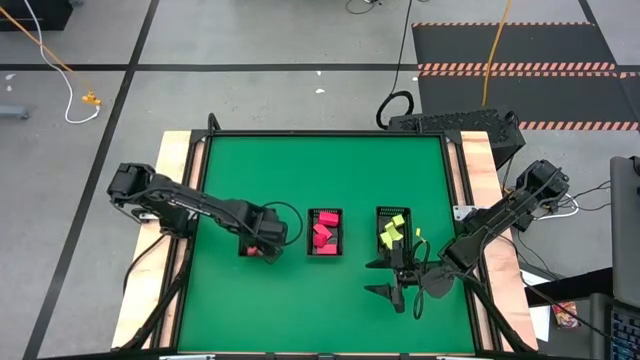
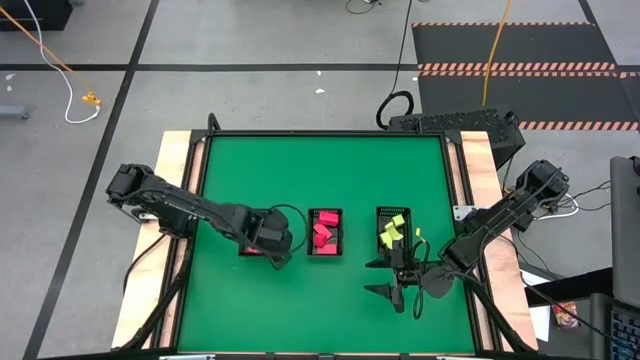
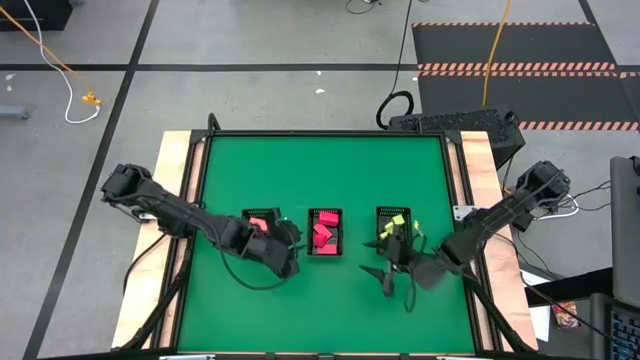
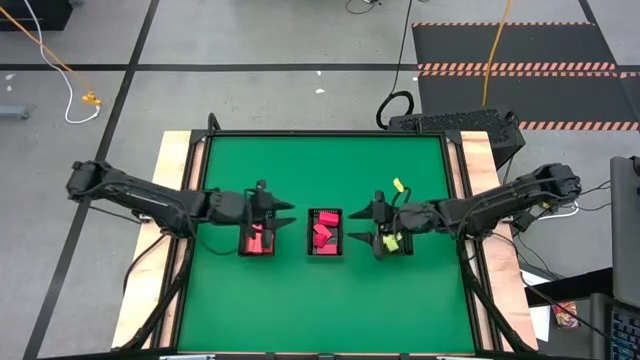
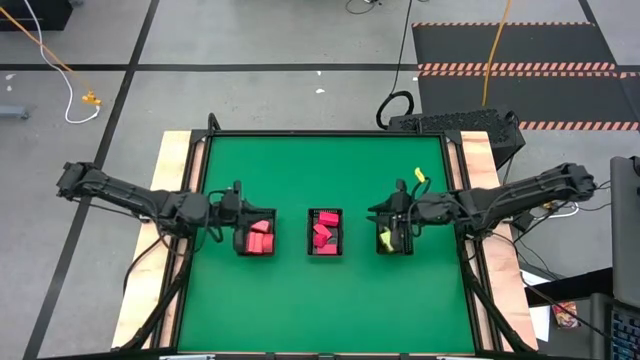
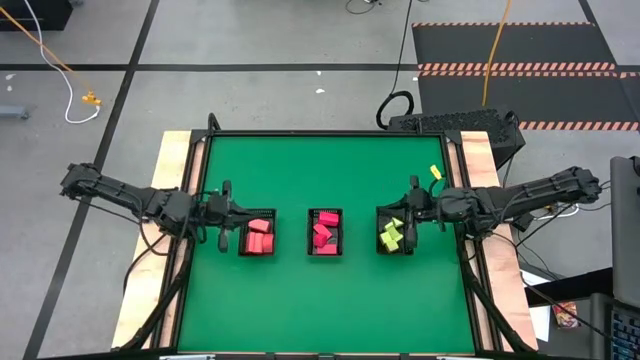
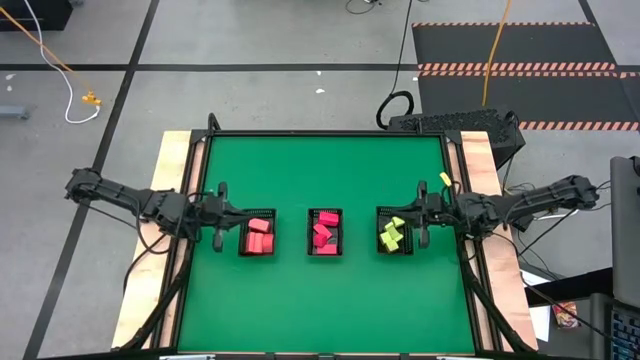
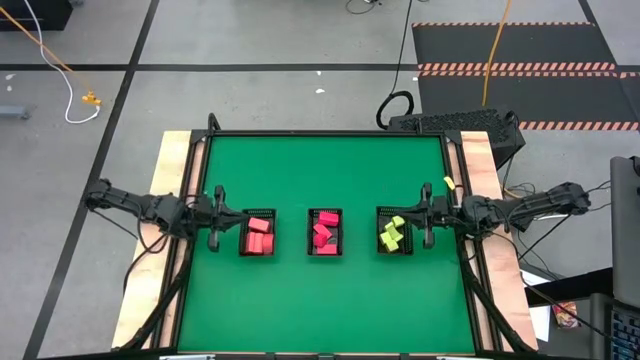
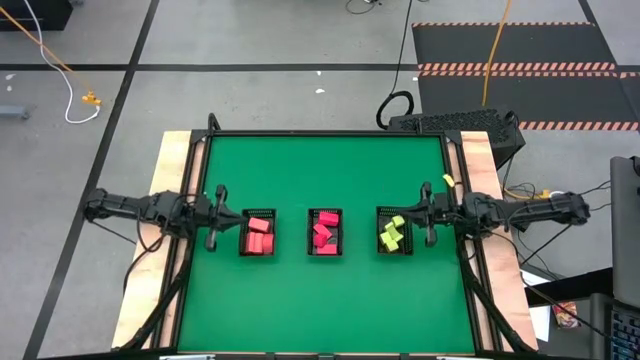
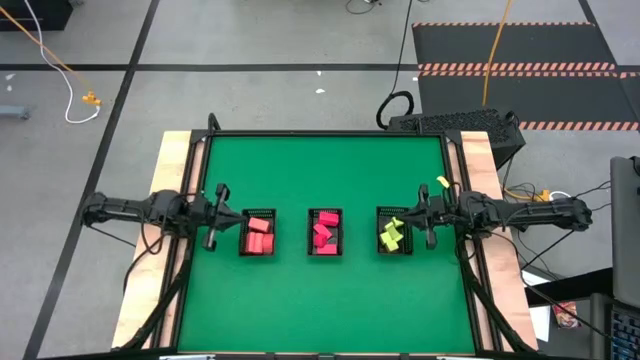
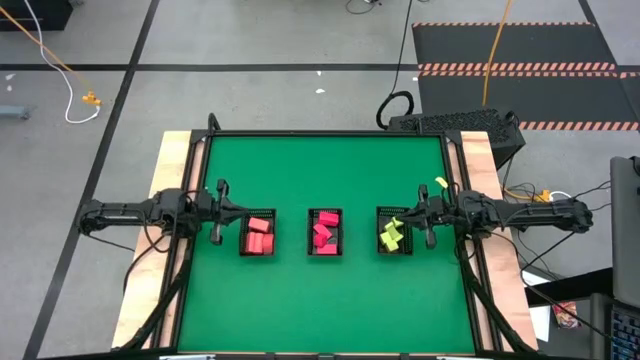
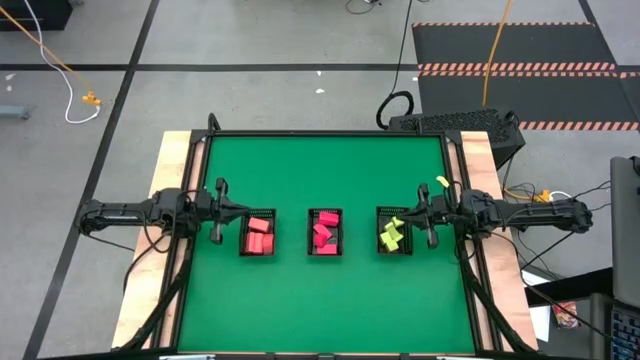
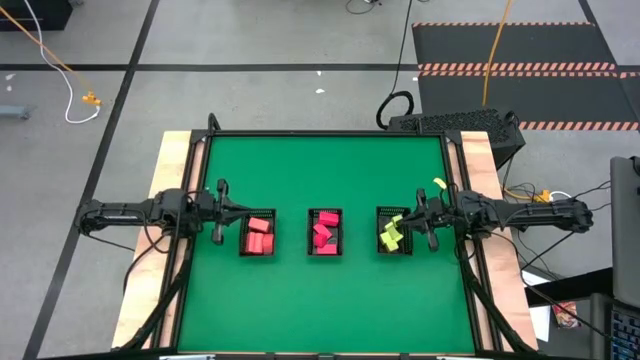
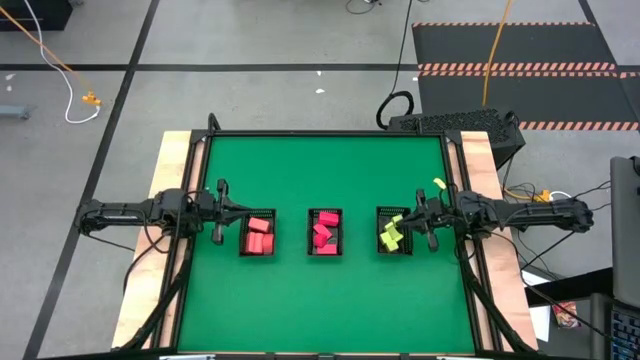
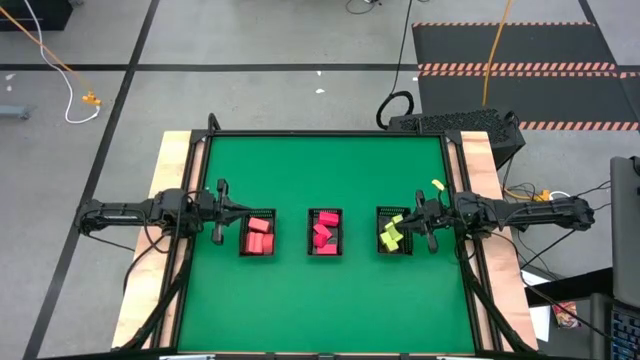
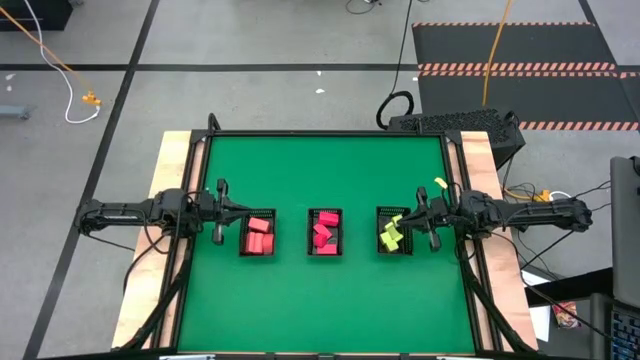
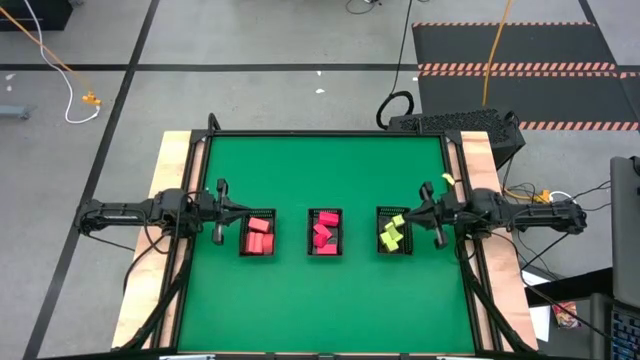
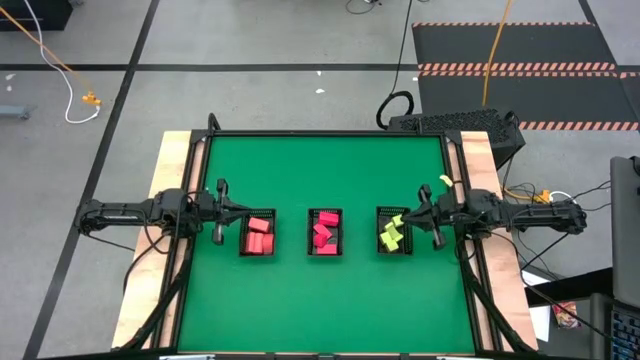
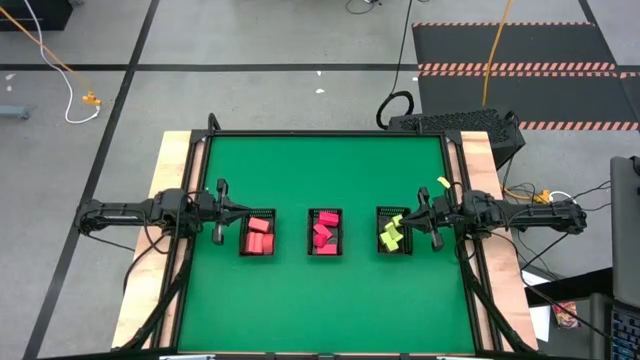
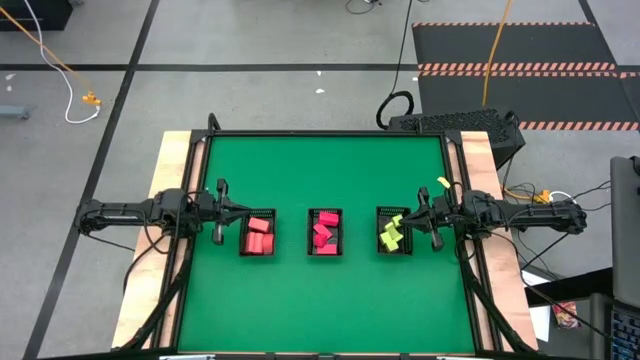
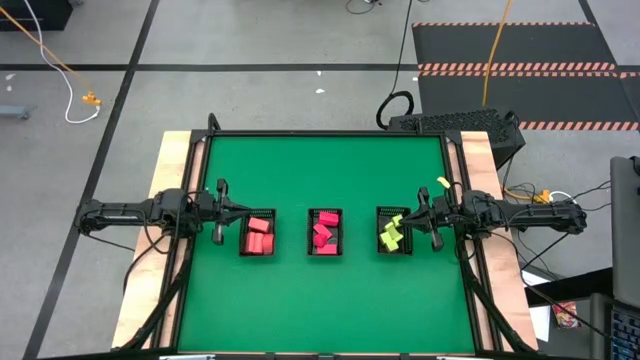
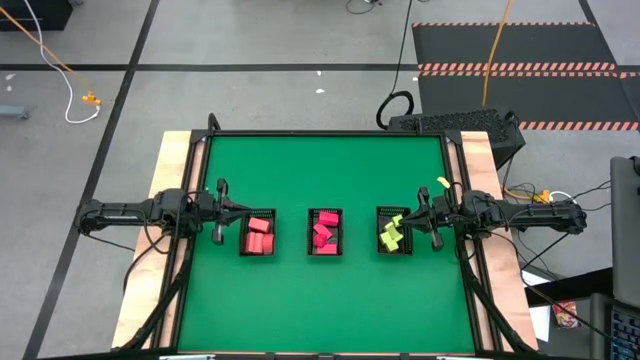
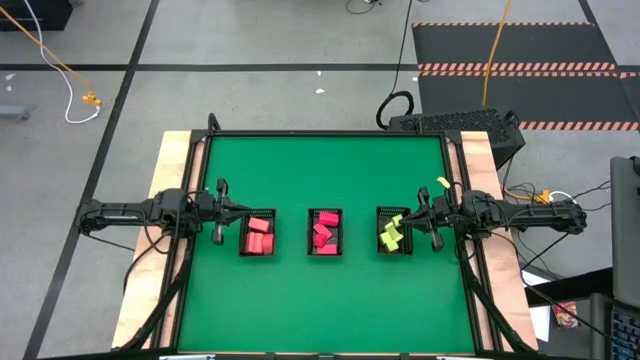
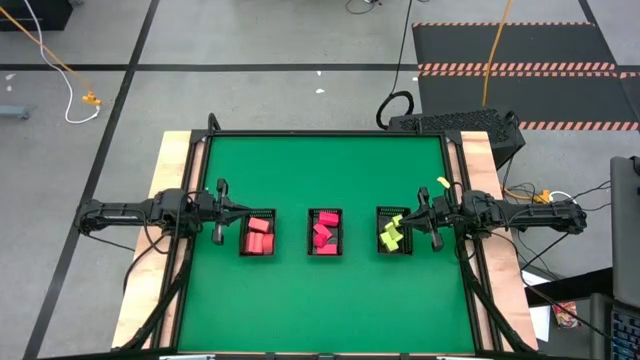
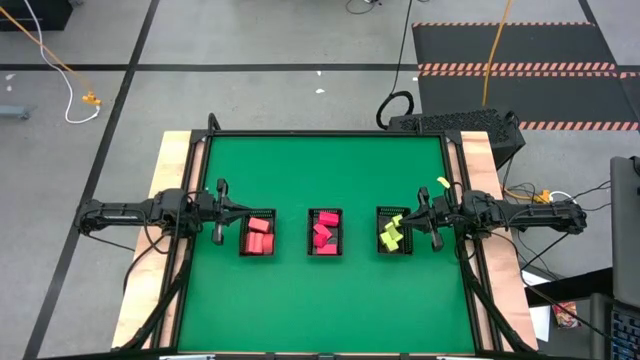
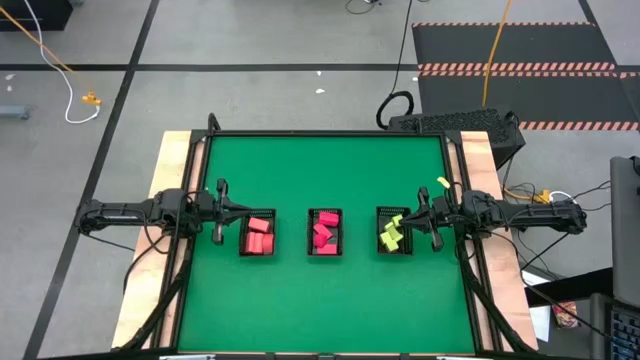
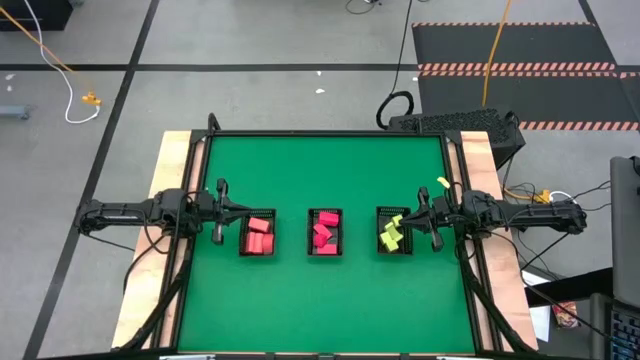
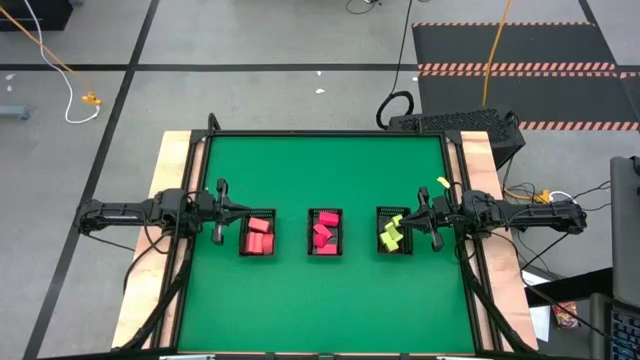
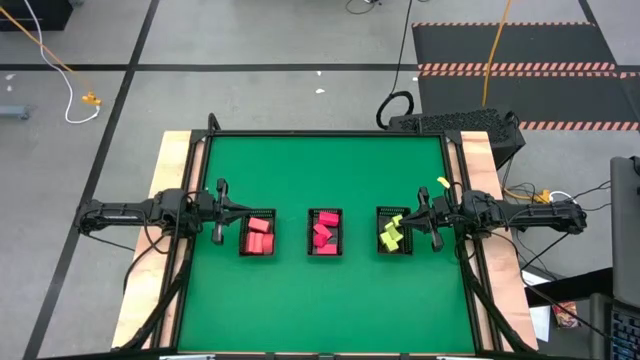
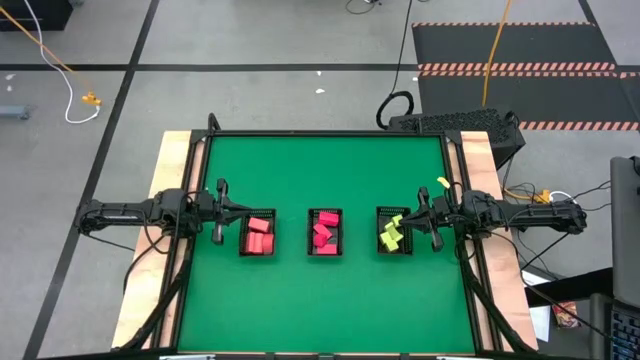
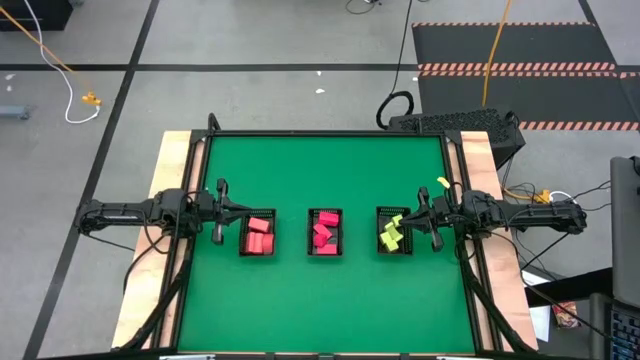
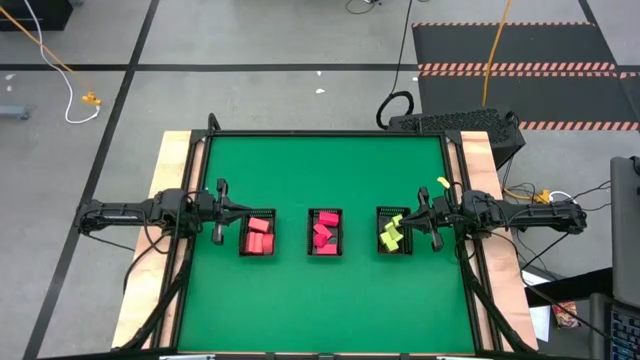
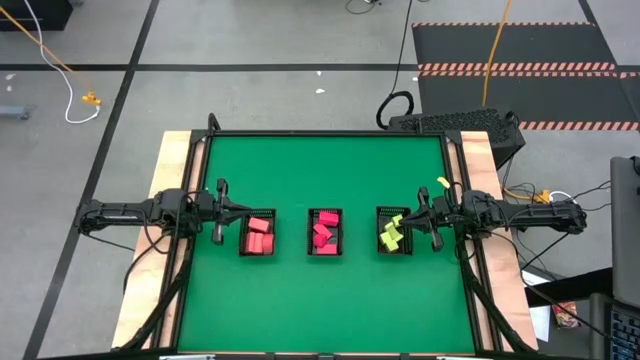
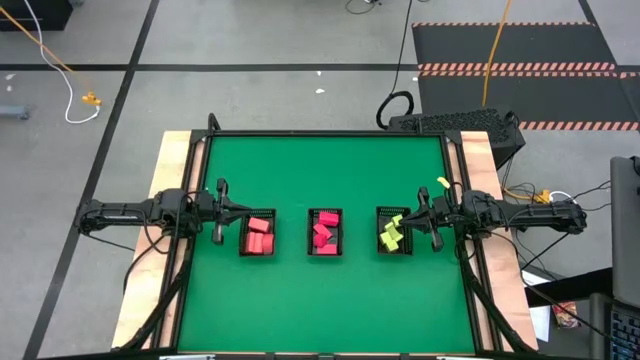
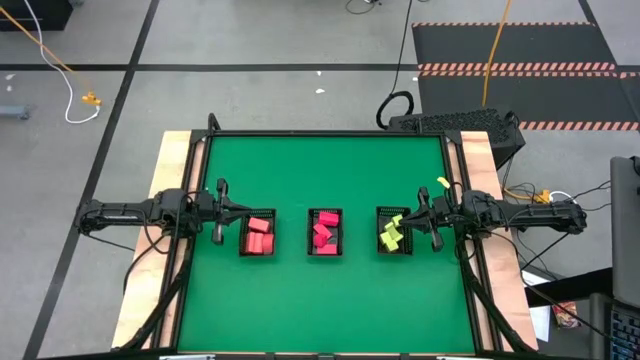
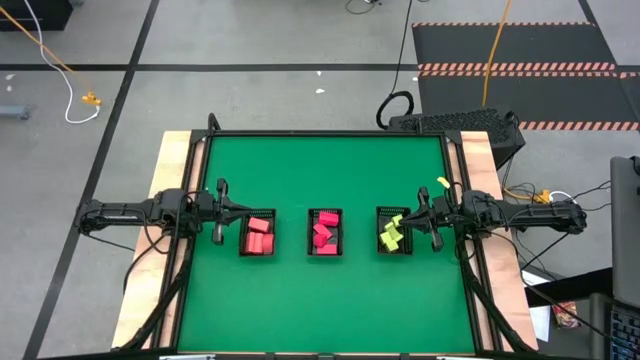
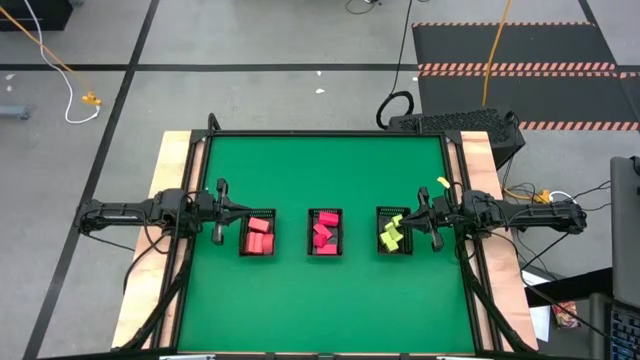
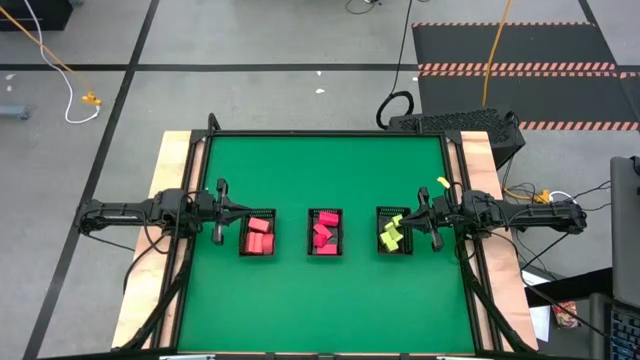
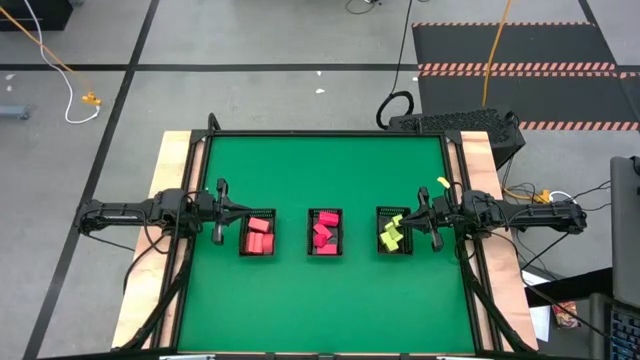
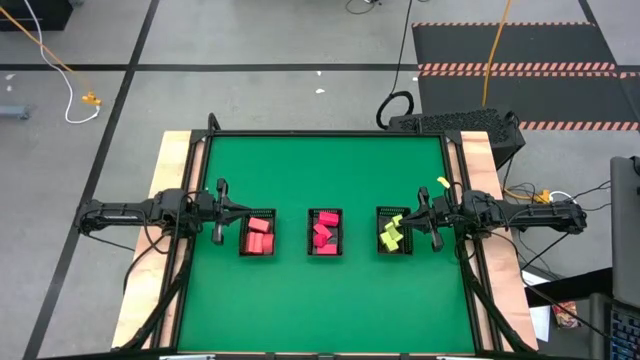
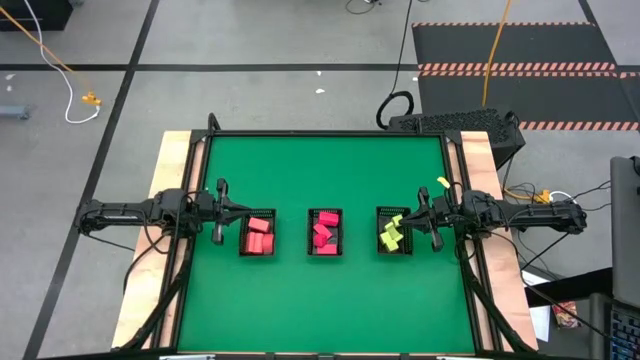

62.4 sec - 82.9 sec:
Task: Sort & place blocks by color
Return to Home Position

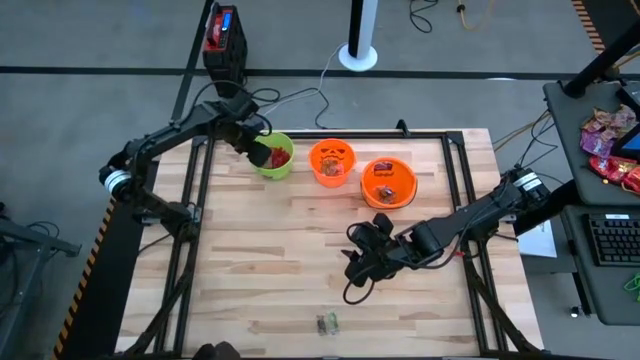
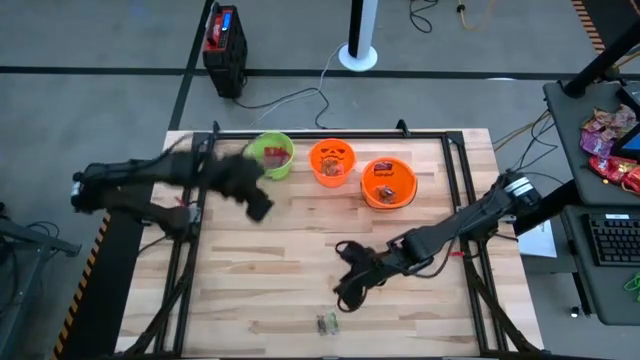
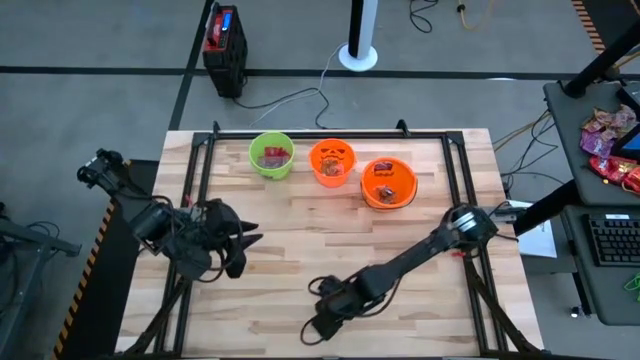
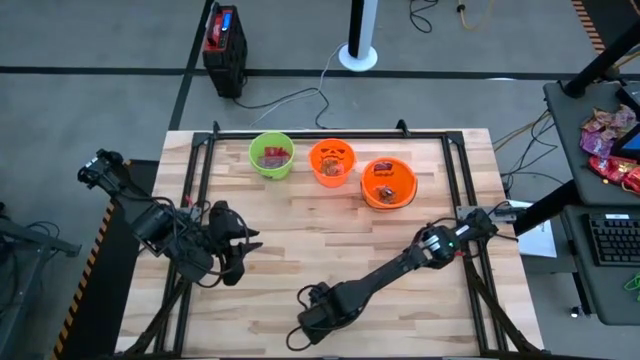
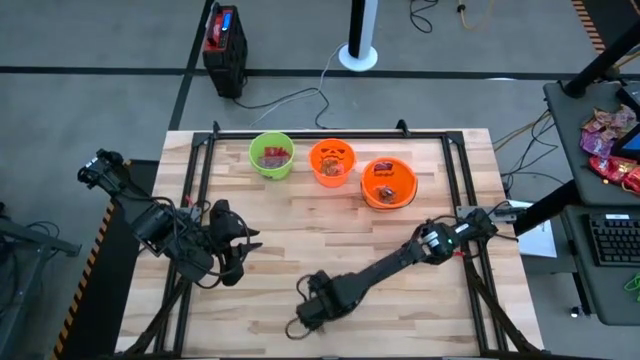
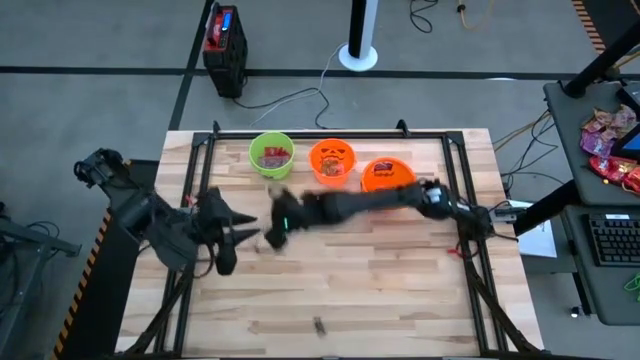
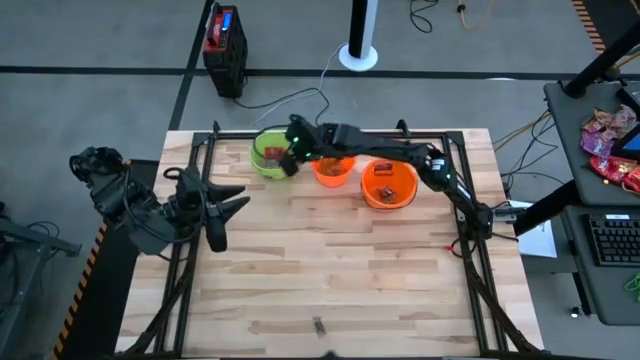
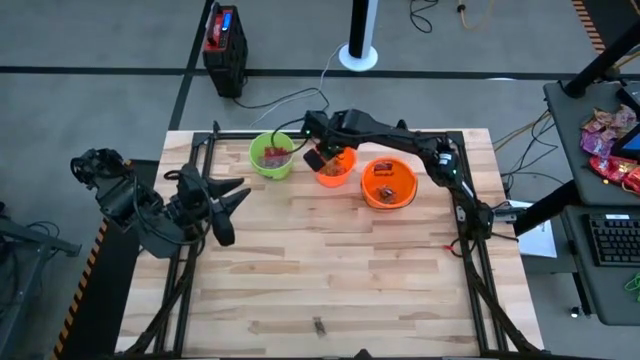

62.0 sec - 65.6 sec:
Task: Sort candy by brand, put in halloween buckets
Put the green gummy into the left orange bucket
